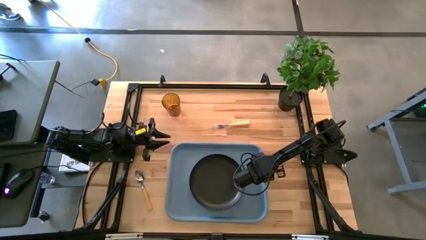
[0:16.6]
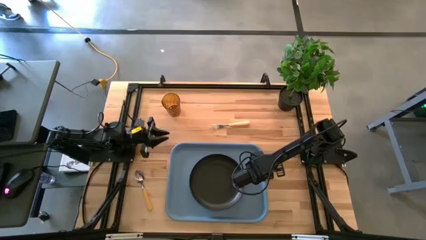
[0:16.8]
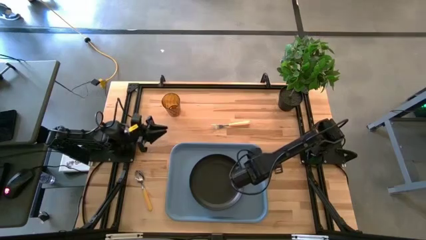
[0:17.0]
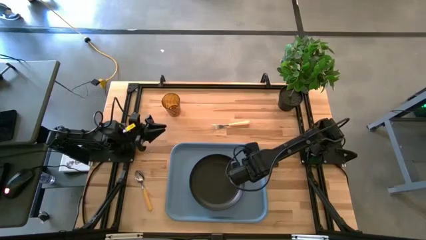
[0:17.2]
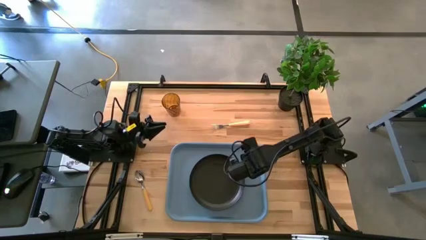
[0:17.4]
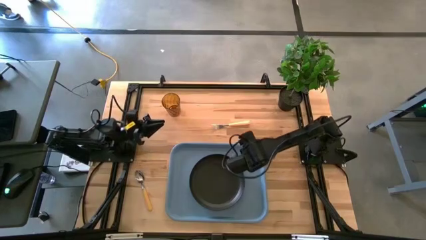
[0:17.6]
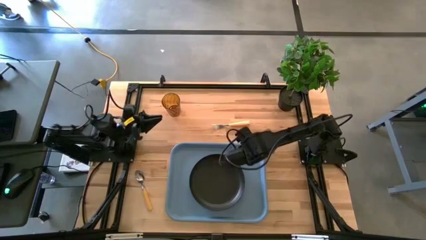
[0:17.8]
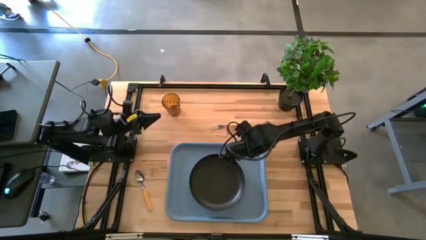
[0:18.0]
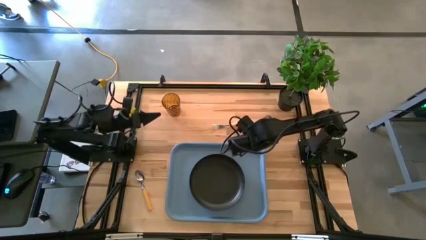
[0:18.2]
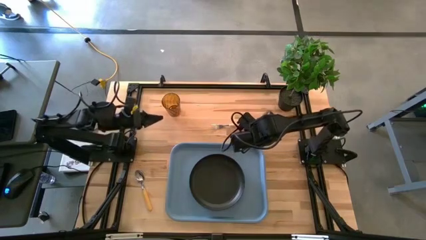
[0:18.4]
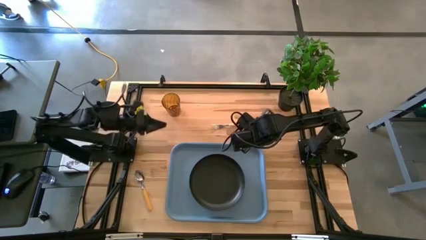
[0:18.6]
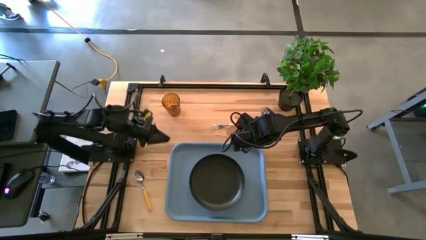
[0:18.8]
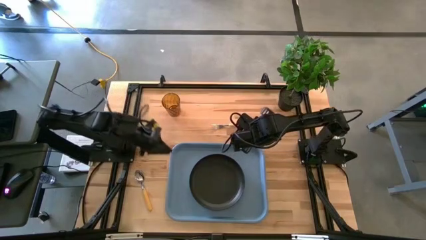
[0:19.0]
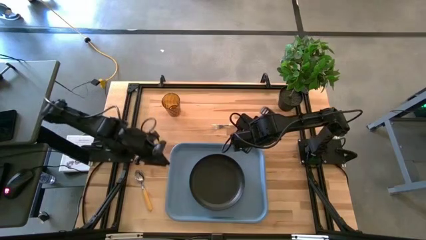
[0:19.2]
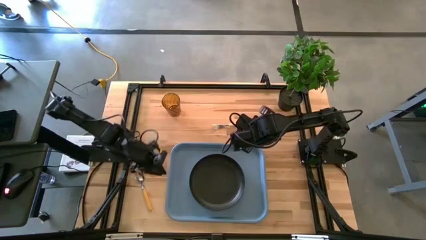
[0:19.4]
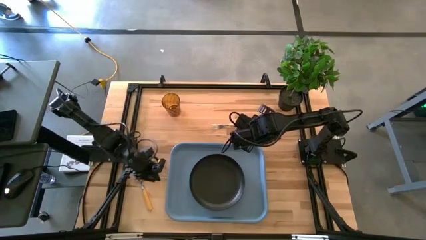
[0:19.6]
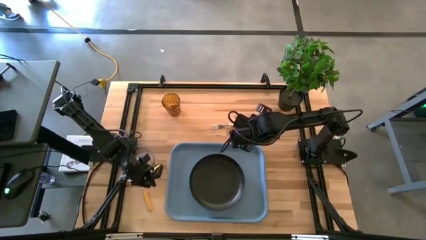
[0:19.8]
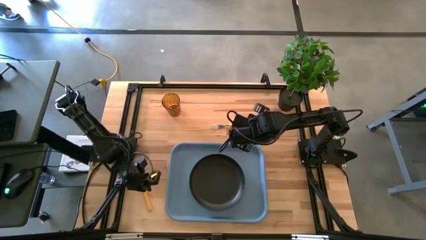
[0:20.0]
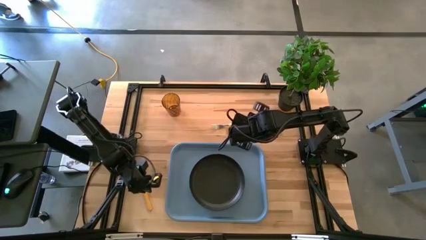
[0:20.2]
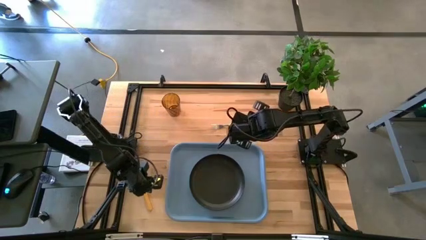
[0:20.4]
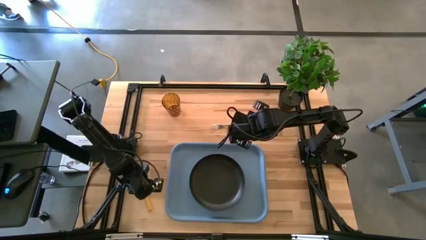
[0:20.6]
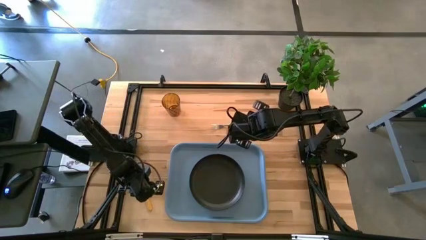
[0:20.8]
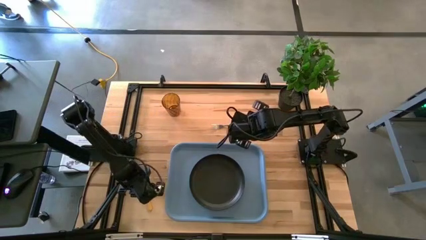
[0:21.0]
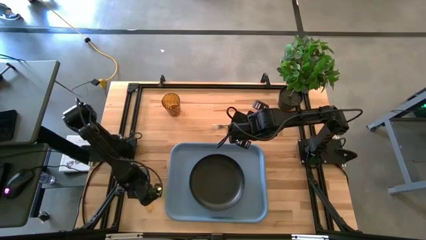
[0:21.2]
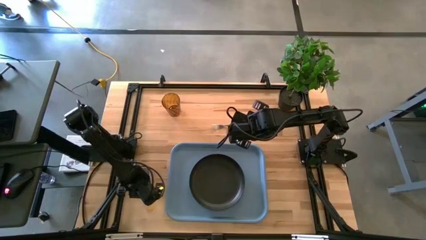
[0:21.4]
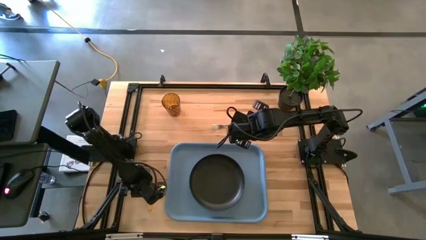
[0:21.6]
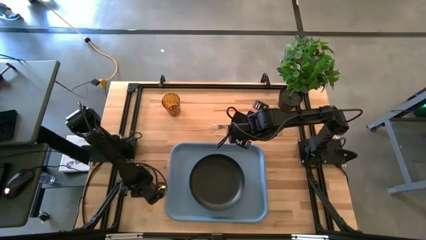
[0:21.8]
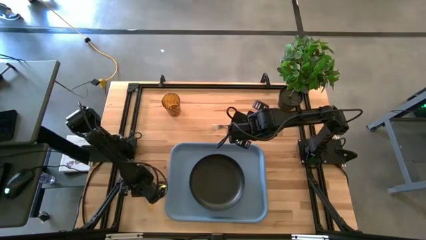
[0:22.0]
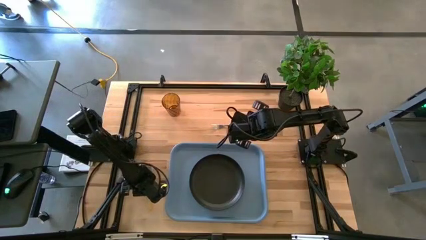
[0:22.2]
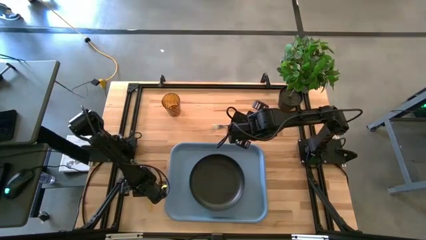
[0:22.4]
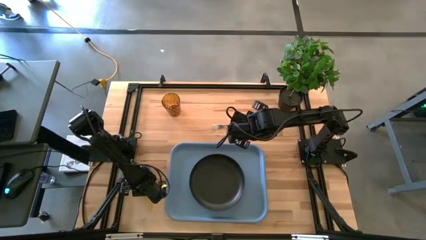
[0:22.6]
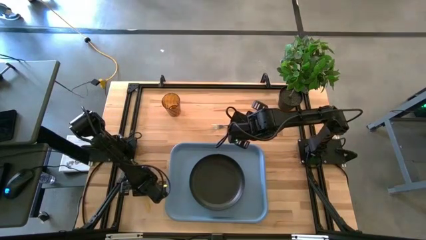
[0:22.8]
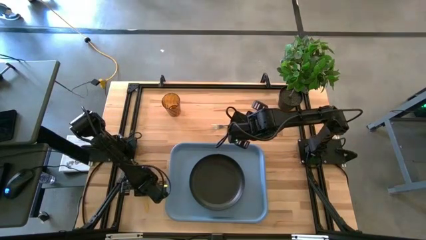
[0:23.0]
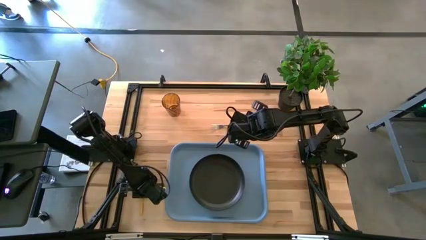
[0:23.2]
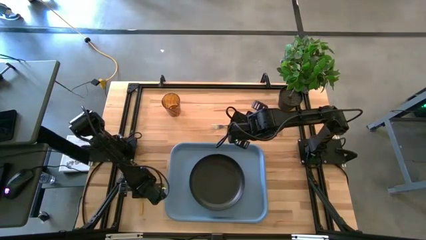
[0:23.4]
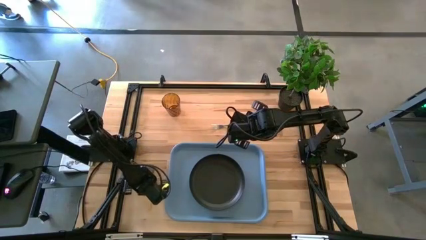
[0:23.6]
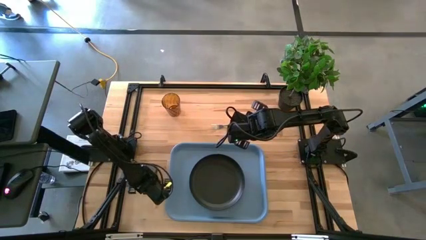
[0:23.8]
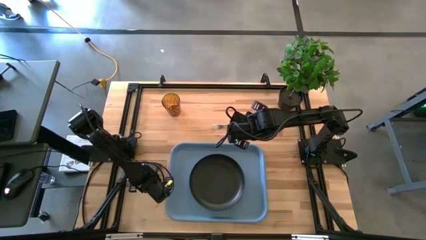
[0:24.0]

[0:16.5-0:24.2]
Task: Pick and place plate/cup/fork/spoon on tray
Put the brown spoon on the blue serving tray to the left of the black plate

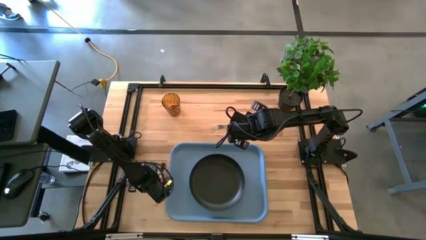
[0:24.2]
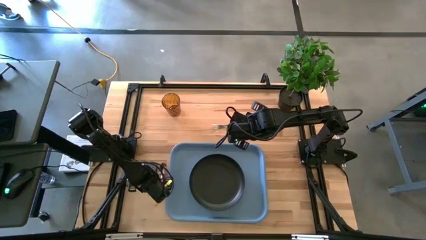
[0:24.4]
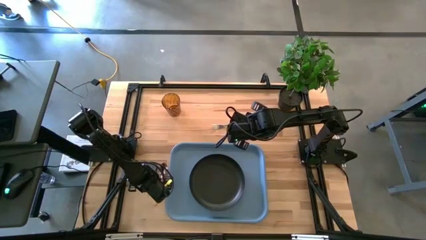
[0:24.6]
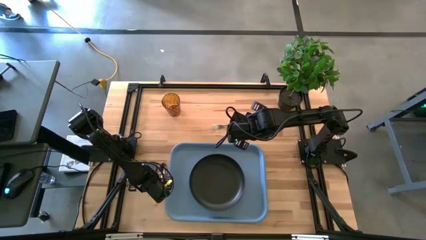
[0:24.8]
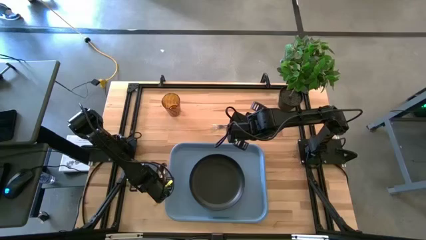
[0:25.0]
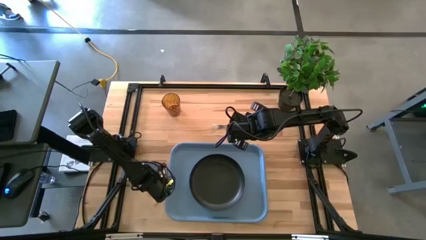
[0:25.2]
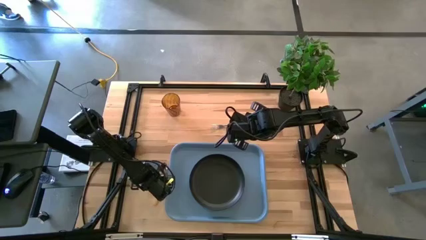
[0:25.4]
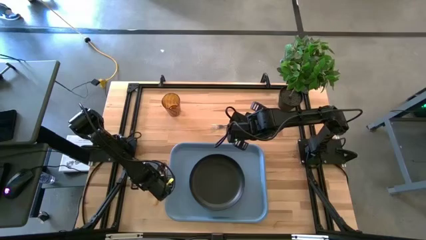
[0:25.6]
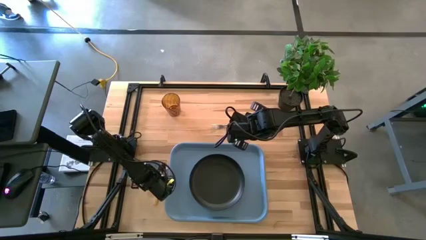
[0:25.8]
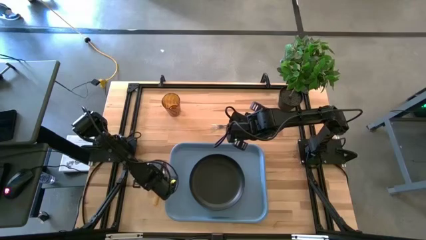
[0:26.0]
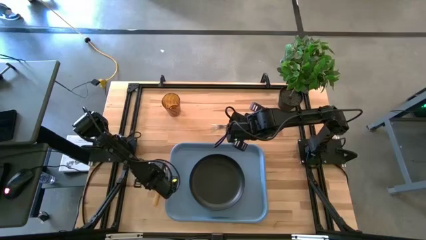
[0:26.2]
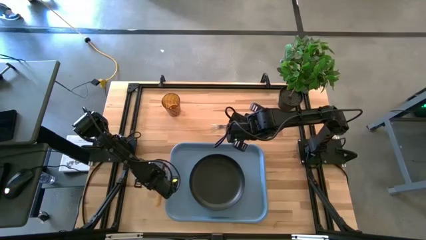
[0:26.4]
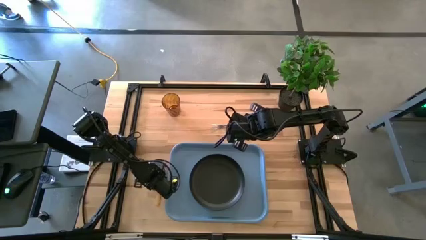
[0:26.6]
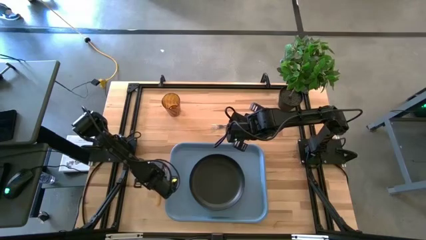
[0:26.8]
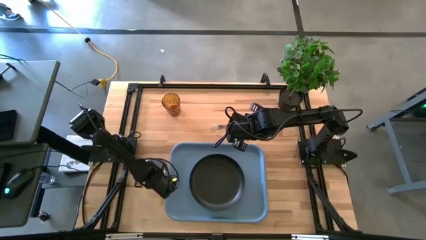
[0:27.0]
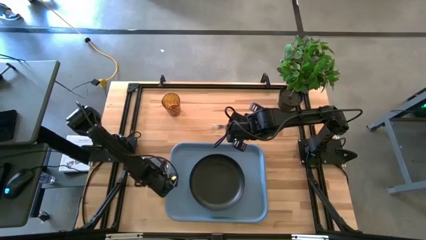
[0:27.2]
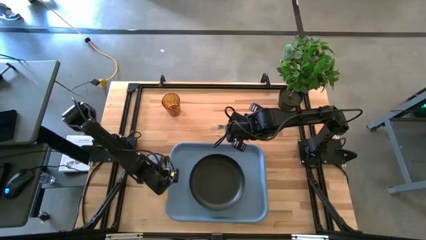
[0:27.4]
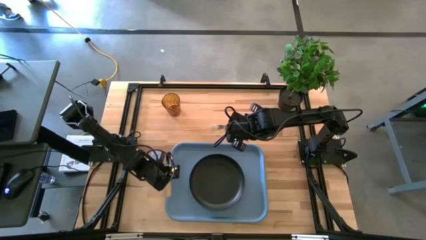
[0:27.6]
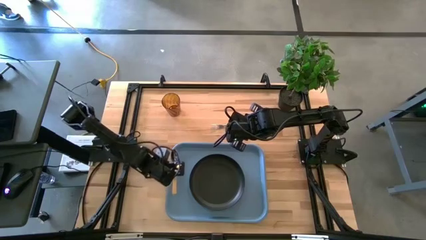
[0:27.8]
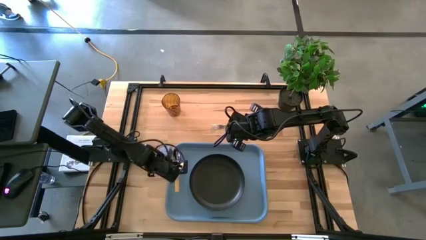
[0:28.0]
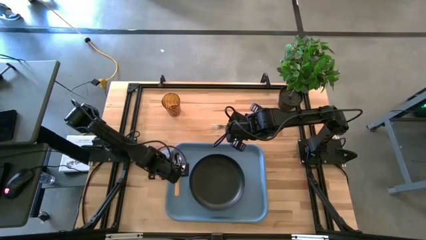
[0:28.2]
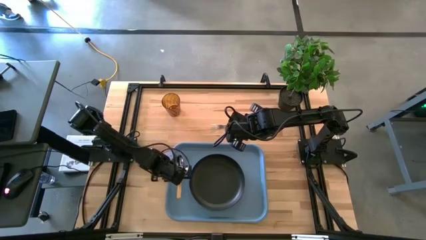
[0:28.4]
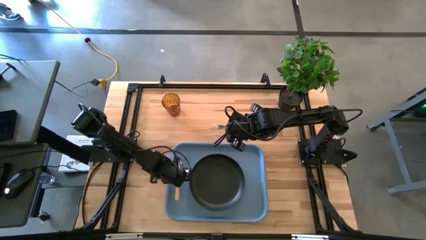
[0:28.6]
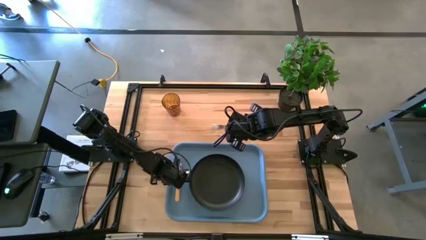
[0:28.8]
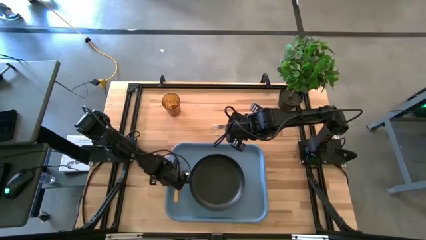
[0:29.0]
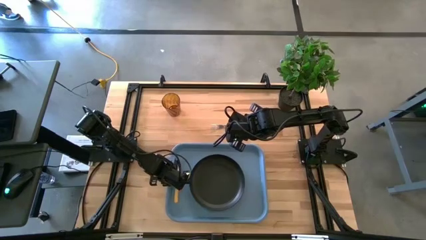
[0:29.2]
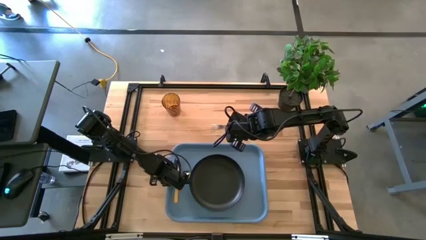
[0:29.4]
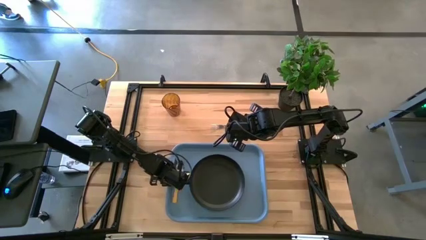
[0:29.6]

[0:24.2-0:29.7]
Put the brown spoon on the blue serving tray to the left of the black plate

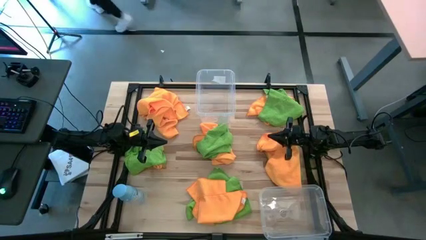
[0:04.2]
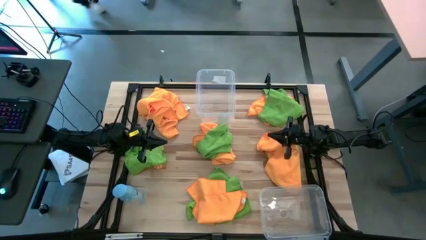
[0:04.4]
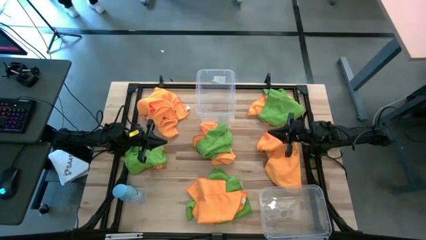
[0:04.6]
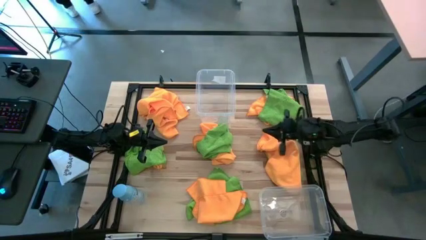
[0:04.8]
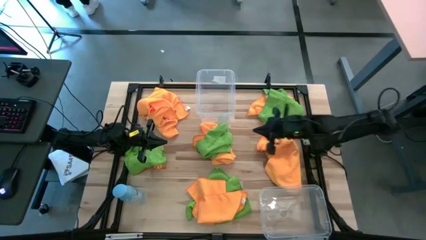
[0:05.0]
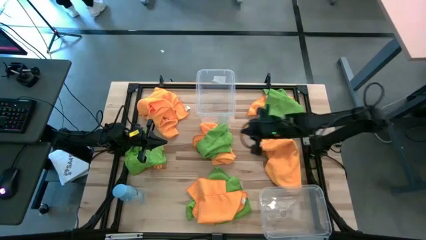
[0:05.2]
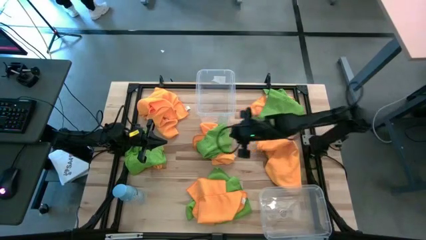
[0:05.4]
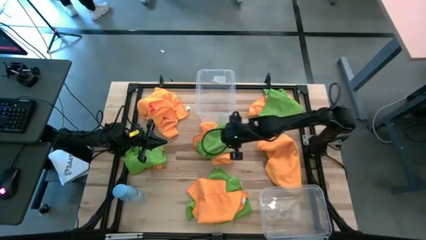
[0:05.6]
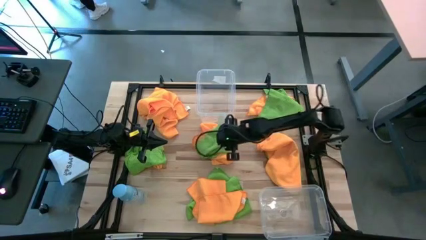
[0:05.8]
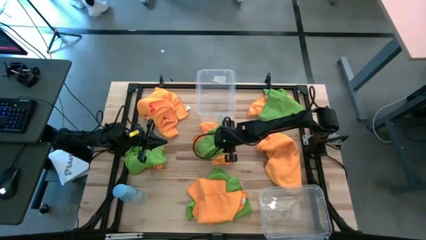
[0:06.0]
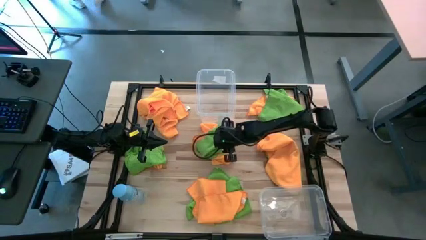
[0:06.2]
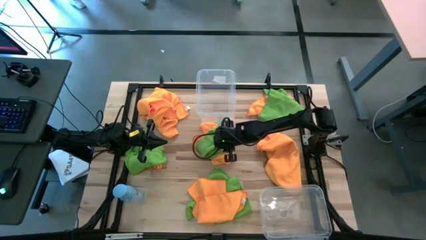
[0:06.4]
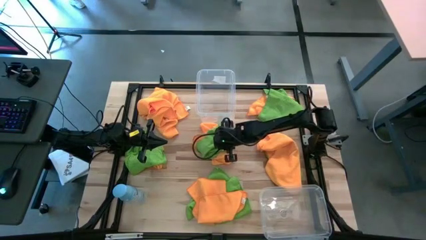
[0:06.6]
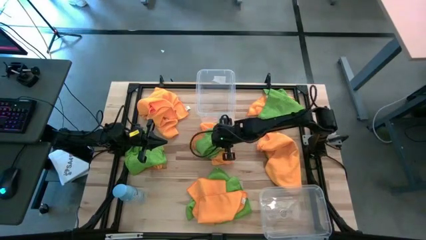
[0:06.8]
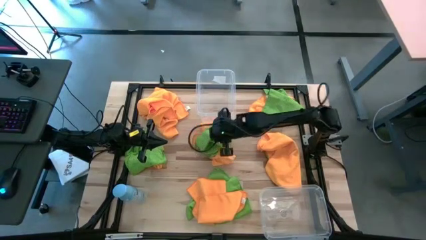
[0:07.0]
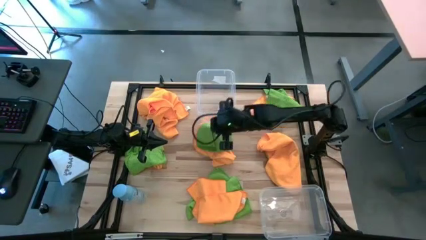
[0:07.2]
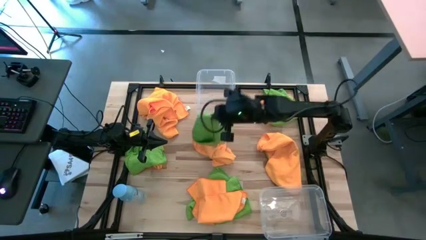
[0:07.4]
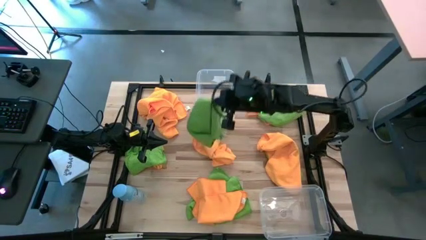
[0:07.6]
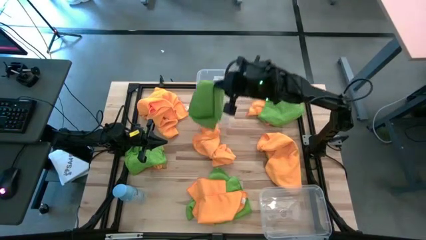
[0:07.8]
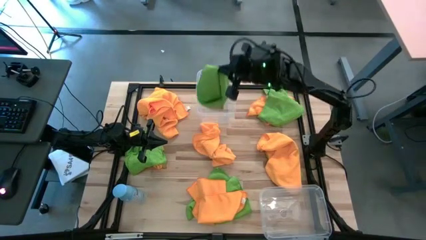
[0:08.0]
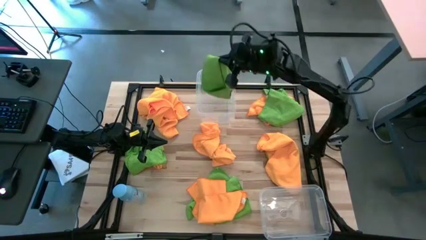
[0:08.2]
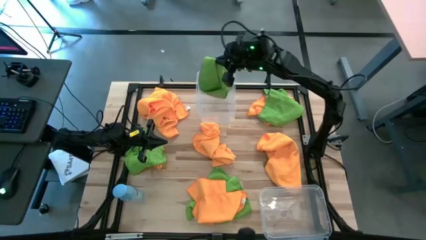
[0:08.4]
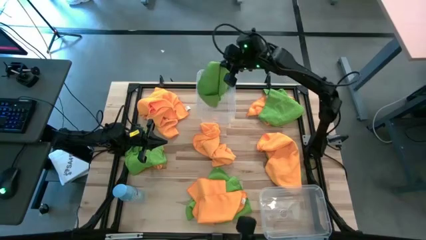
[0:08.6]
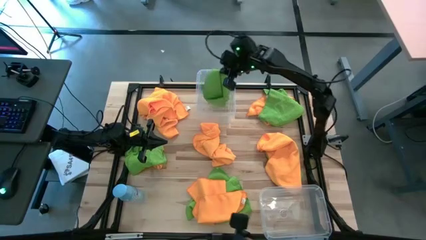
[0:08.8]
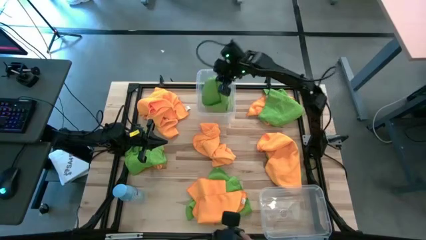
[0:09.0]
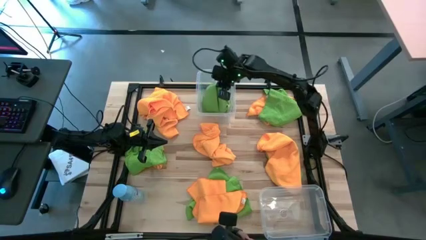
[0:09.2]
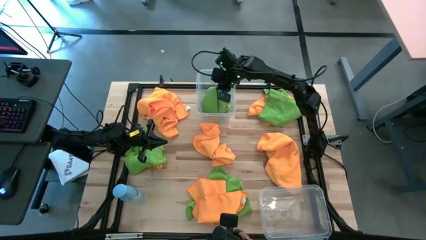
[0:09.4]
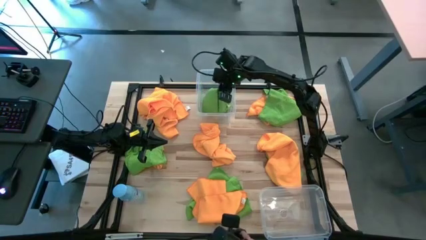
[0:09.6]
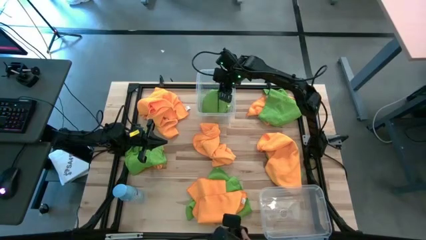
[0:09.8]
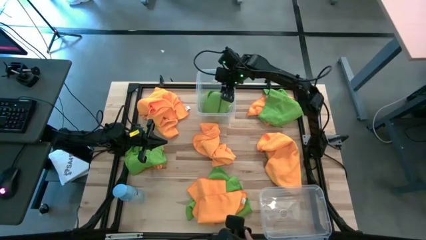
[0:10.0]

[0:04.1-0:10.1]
Task: Sort microfiber towel by color & place in baskets
Put the green microfiber towel into the top transparent bin
